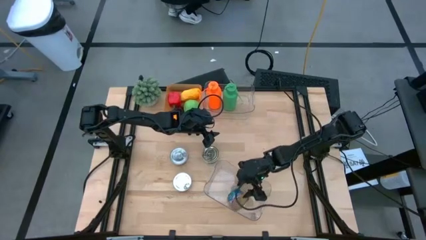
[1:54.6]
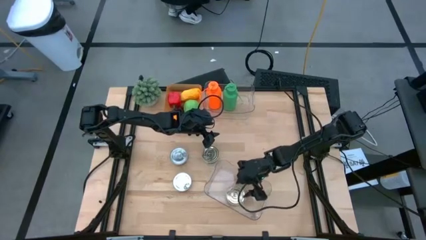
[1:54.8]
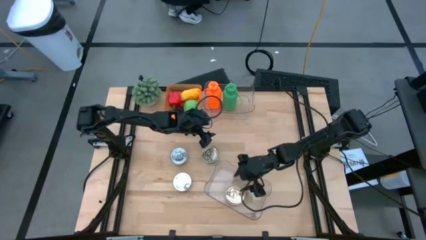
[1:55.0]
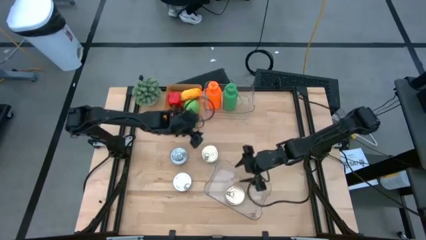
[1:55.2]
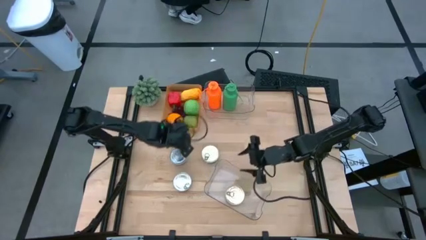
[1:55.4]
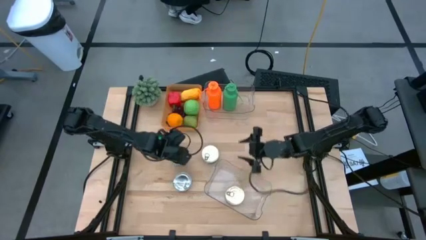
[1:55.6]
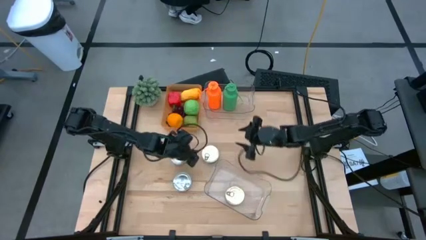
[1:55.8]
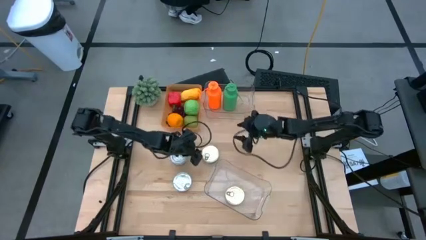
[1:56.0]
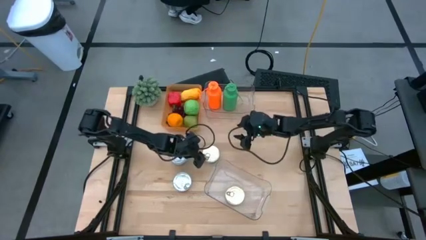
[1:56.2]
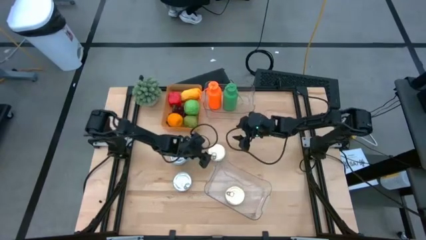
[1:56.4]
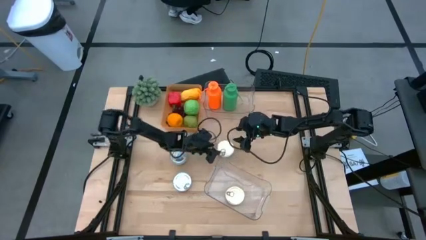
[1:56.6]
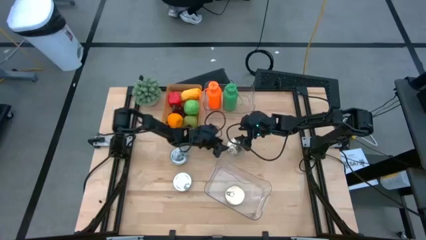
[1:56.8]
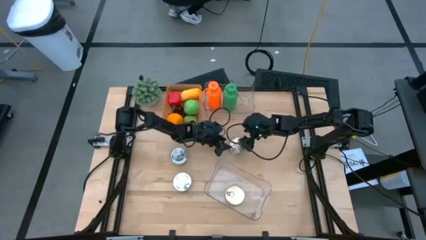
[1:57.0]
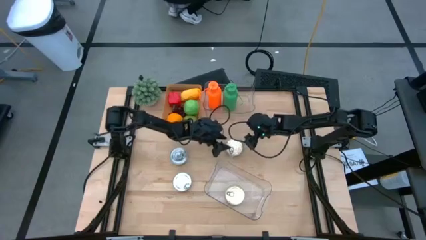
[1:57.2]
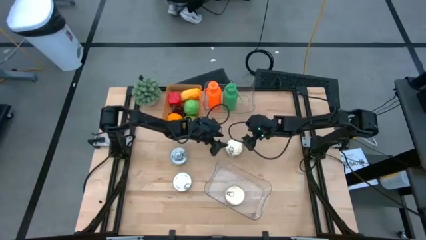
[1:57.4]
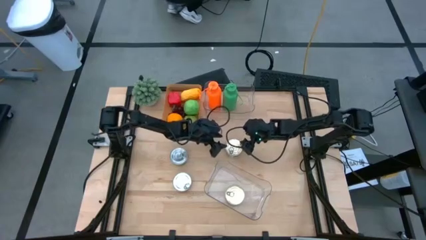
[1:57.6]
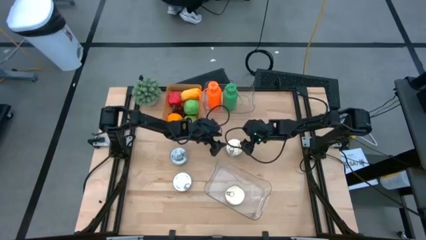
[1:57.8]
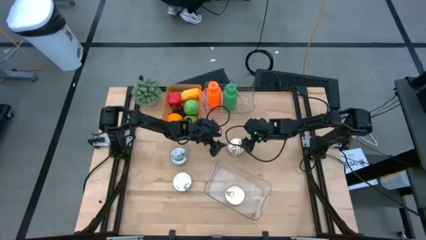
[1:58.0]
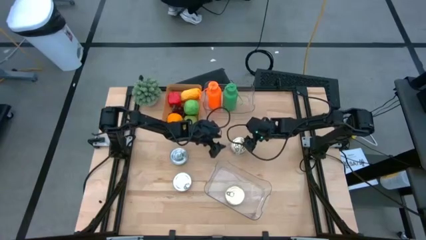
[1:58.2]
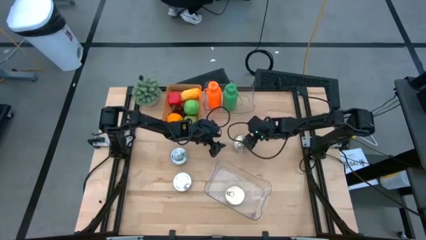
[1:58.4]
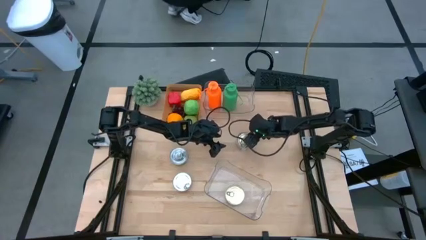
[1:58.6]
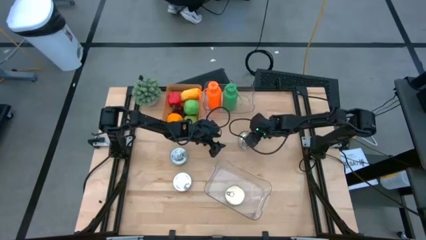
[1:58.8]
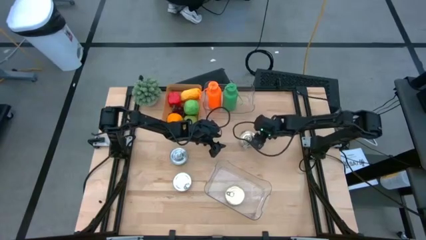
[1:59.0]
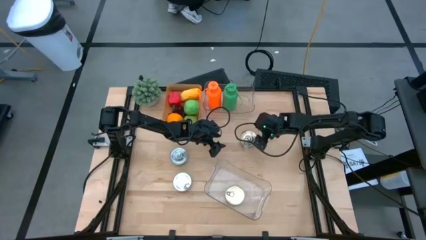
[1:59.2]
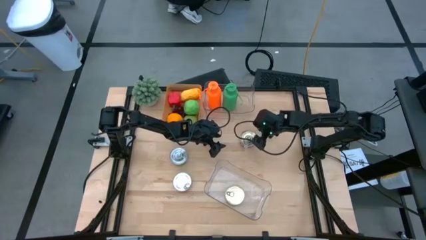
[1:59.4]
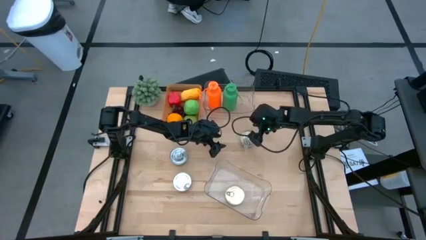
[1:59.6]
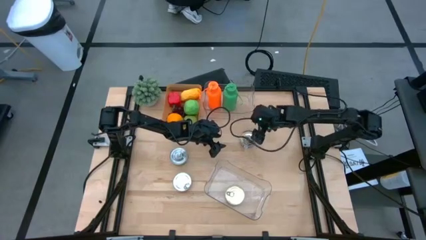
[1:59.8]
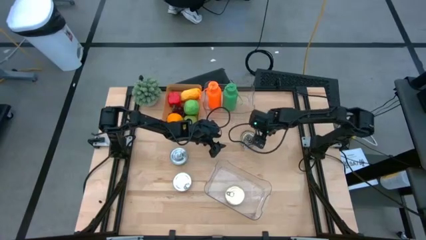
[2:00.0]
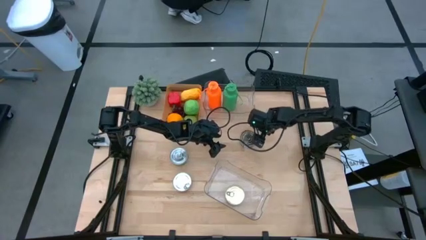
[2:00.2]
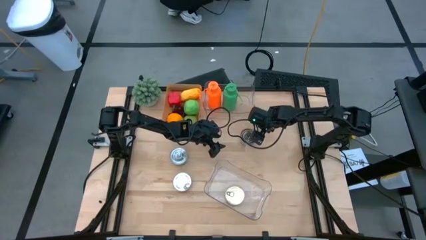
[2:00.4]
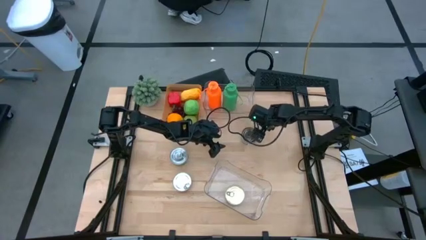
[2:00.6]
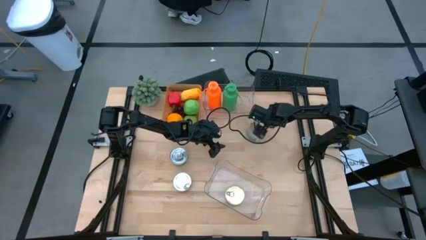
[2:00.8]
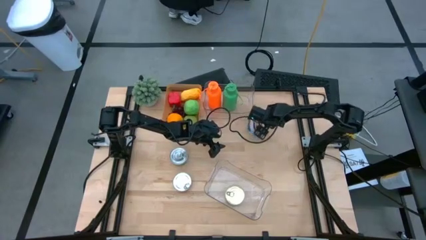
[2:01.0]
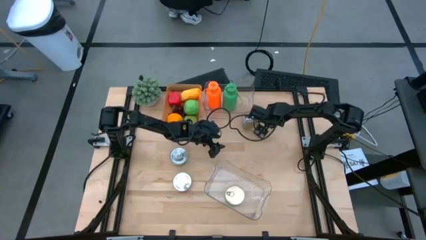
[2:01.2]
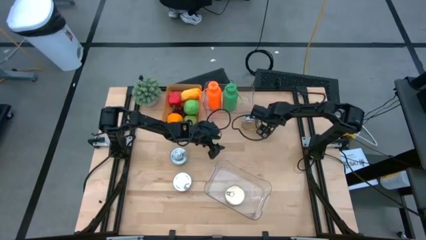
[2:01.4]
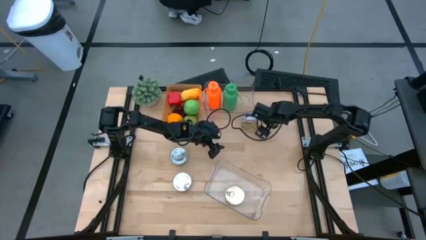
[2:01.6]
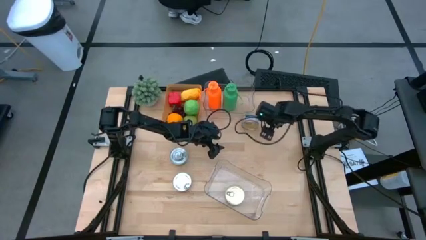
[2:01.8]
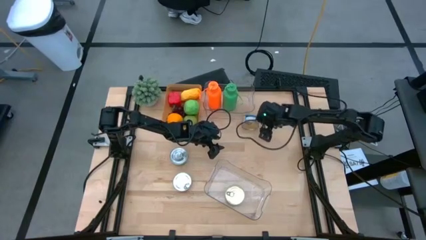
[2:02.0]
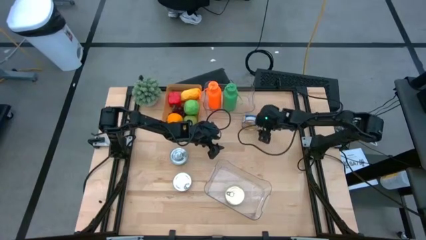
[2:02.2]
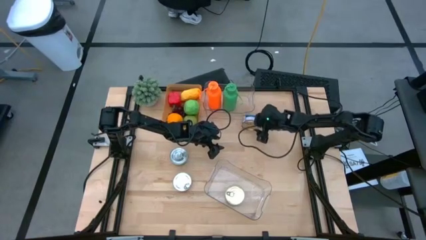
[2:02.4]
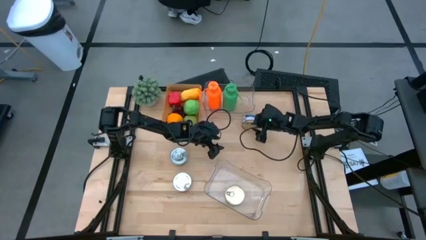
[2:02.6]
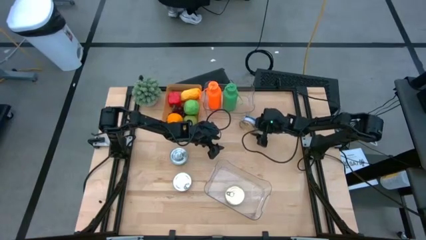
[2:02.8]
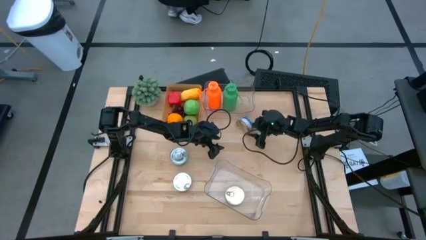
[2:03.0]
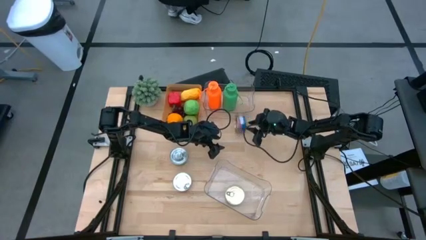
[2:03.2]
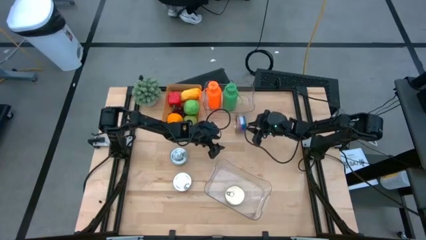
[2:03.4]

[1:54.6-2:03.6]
Task: Pick & Place Food Item
Stack the blue pink tuna can on top of the blue pink tuna can into the bottom transparent bin

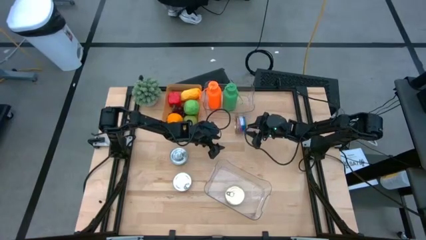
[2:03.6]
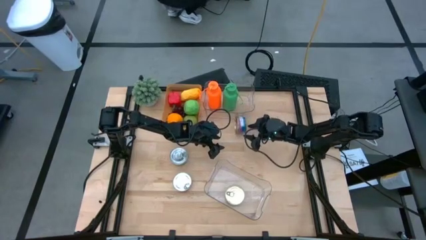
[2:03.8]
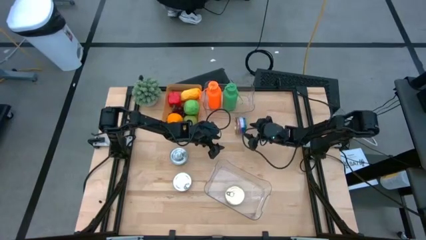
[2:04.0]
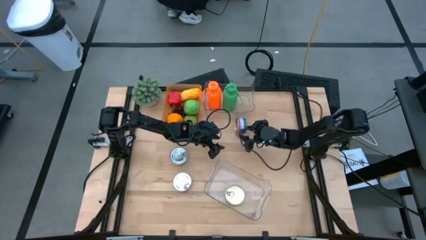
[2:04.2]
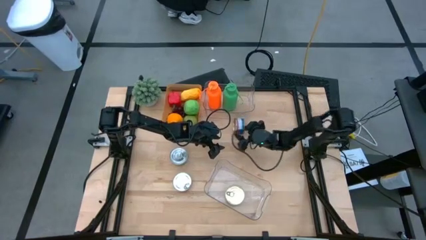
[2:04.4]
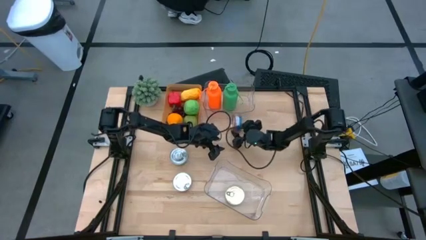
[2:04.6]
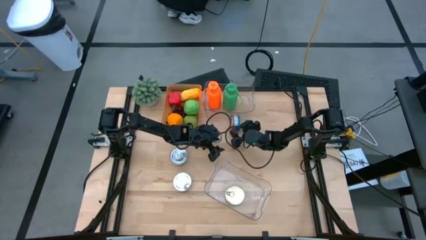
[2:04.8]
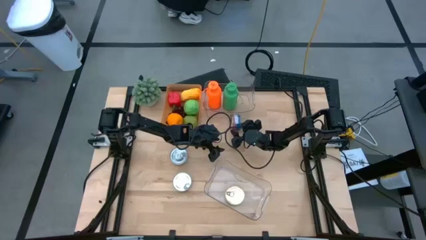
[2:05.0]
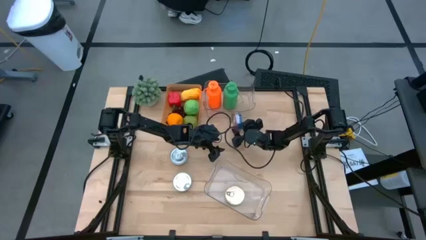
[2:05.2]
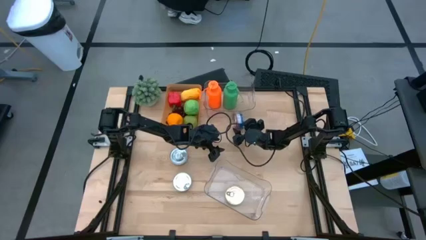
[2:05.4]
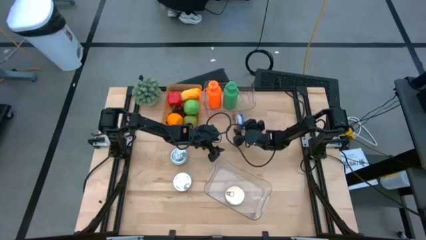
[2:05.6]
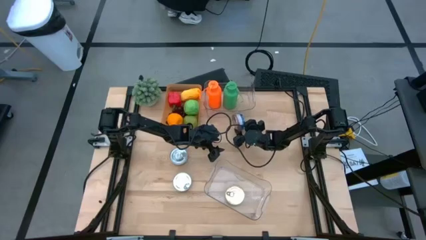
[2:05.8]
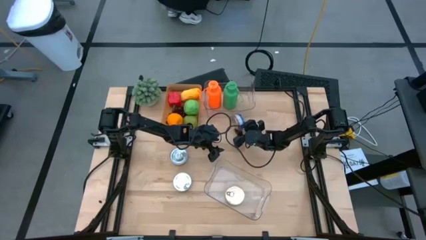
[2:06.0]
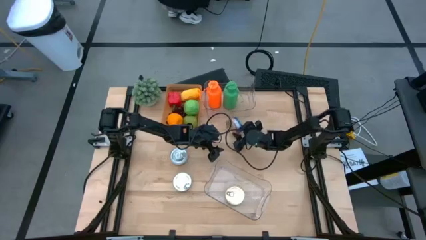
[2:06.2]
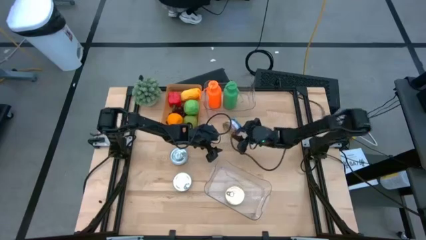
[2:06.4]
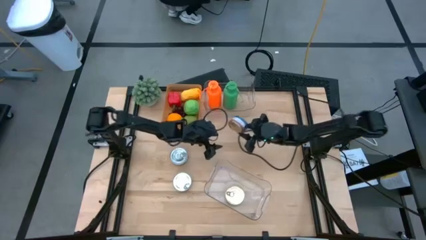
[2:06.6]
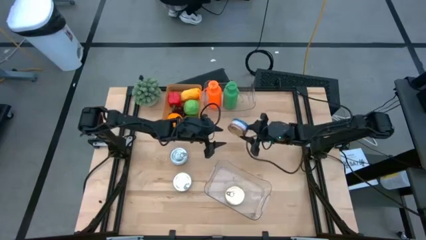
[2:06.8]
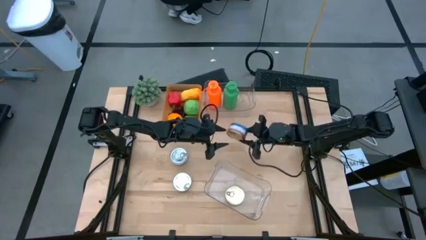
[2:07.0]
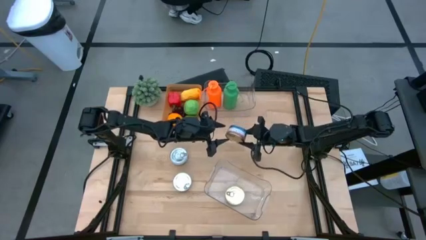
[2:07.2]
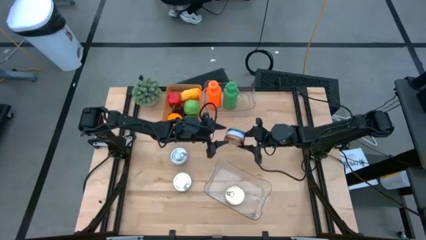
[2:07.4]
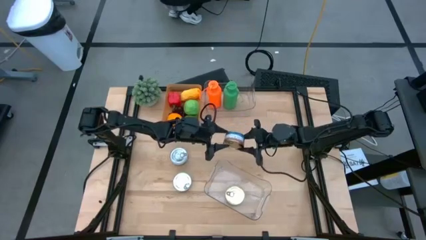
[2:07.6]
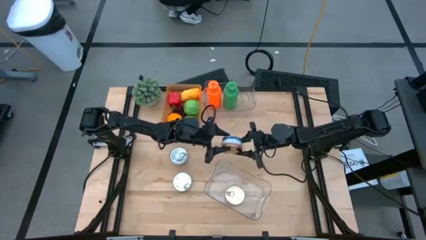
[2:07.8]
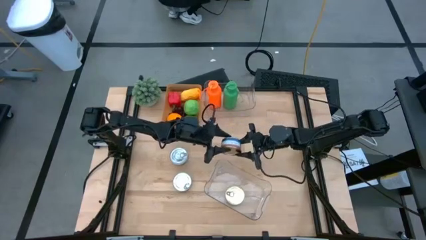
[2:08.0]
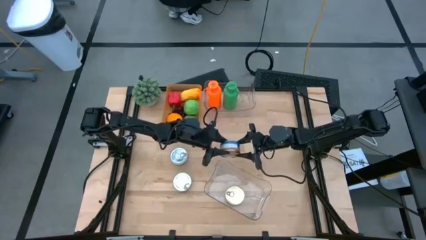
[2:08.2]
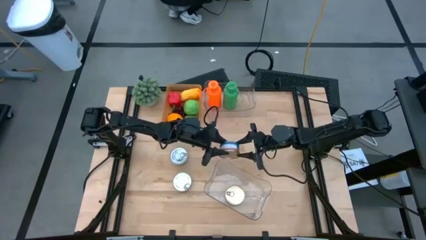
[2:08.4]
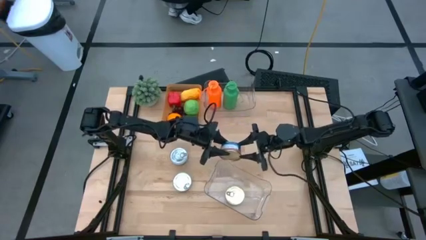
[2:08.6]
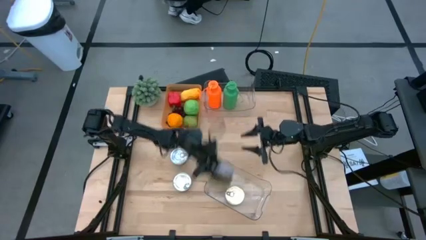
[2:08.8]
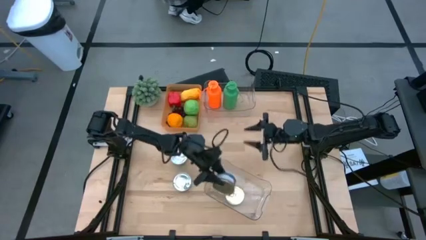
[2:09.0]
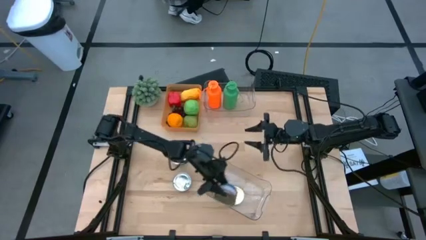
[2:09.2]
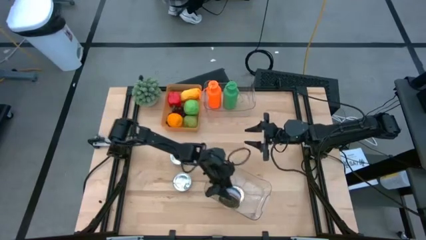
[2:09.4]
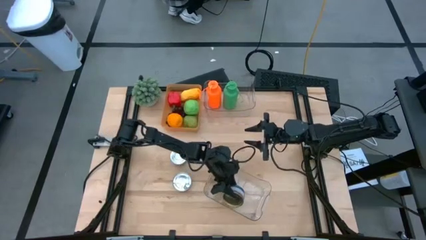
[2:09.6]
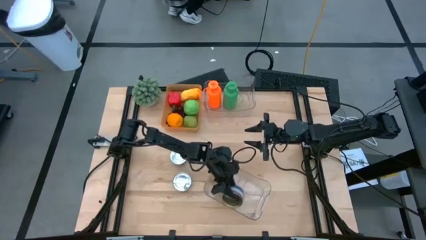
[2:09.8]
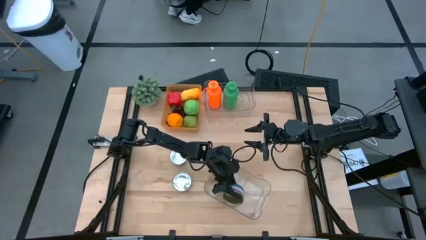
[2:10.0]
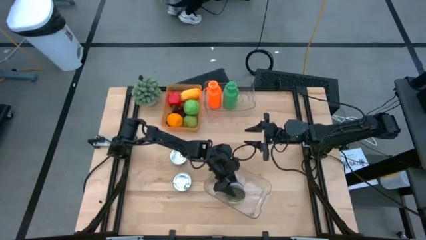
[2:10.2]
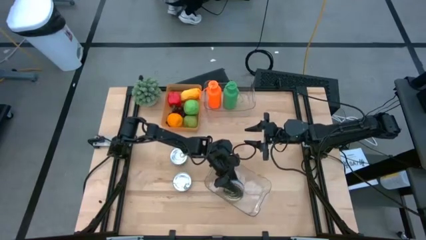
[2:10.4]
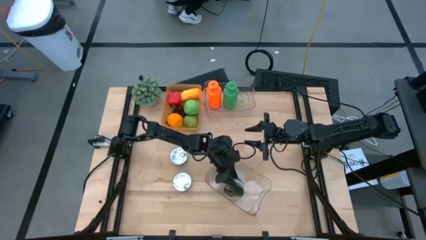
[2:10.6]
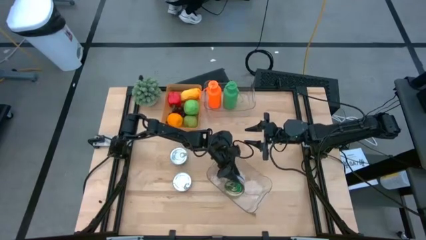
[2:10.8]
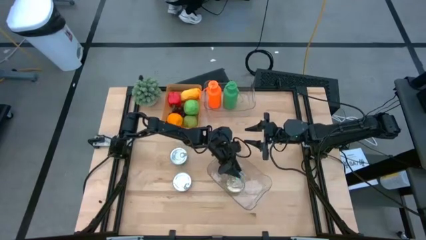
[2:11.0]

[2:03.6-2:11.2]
Stack the blue pink tuna can on top of the blue pink tuna can in the bottom transparent bin
